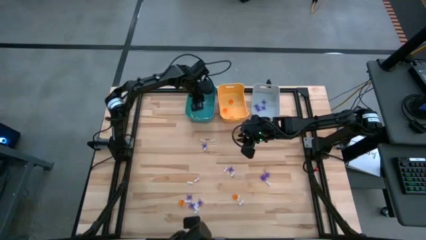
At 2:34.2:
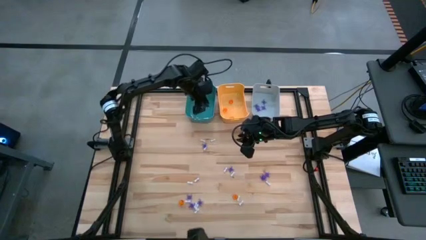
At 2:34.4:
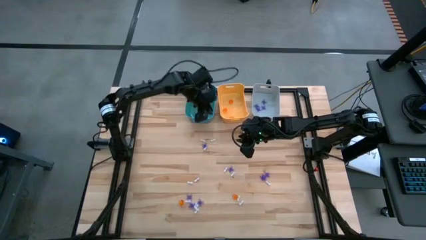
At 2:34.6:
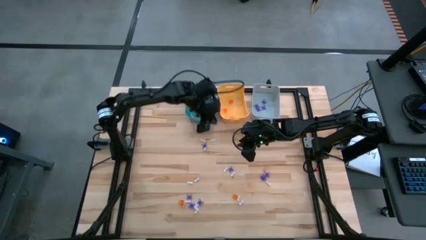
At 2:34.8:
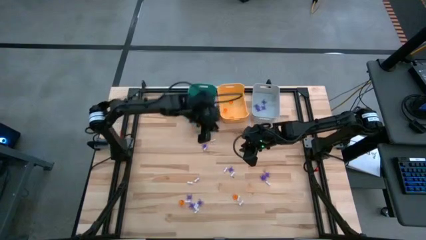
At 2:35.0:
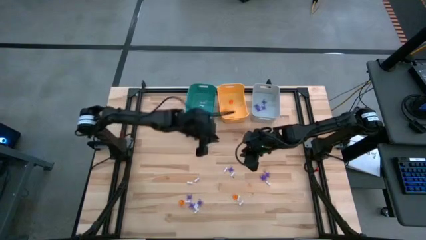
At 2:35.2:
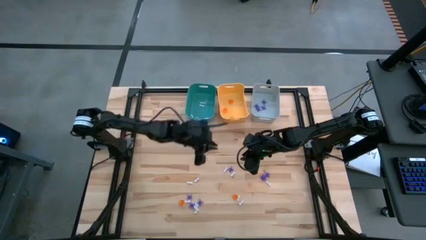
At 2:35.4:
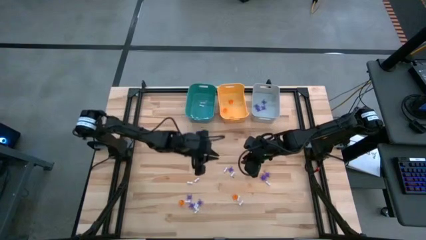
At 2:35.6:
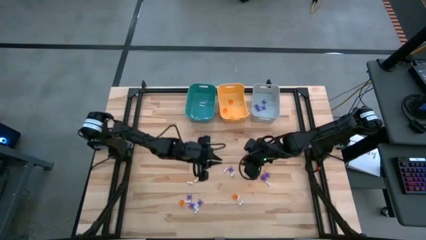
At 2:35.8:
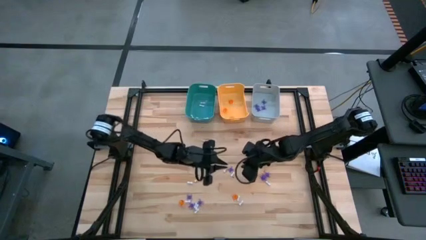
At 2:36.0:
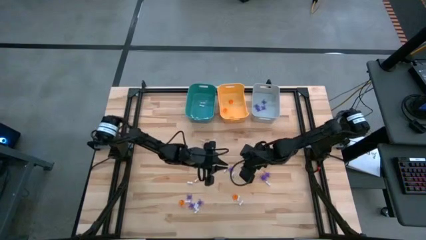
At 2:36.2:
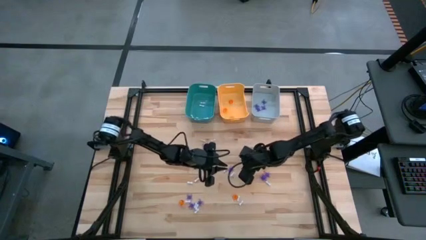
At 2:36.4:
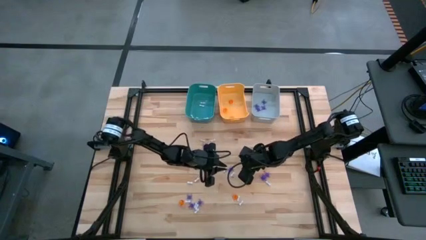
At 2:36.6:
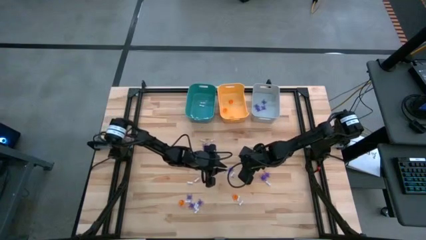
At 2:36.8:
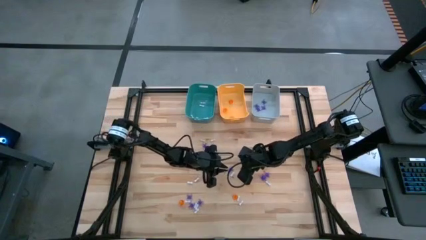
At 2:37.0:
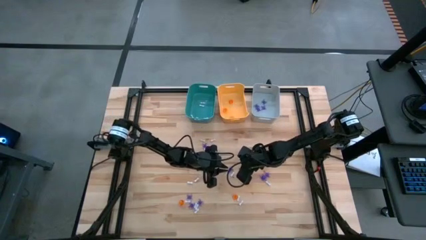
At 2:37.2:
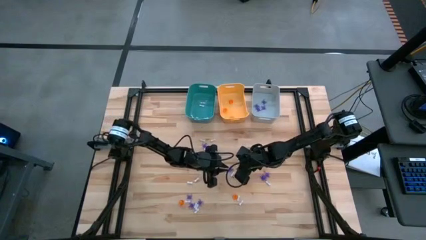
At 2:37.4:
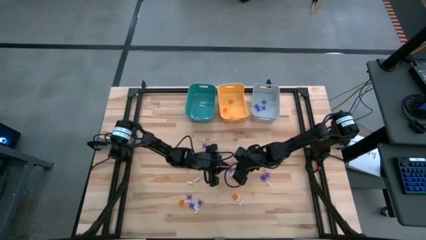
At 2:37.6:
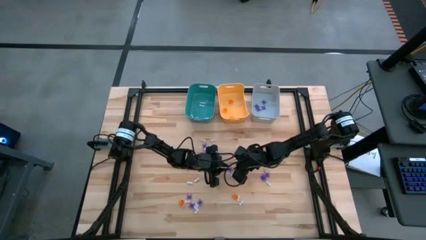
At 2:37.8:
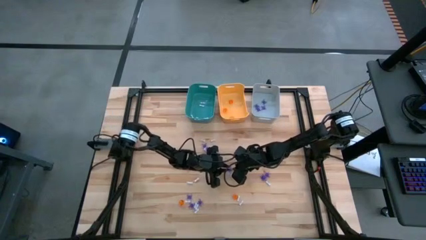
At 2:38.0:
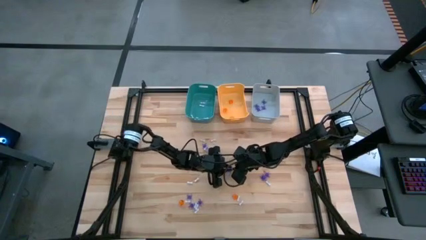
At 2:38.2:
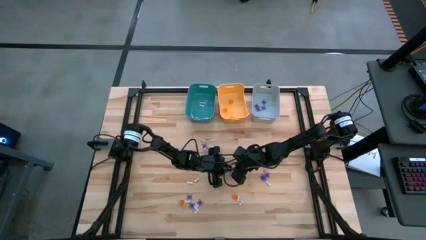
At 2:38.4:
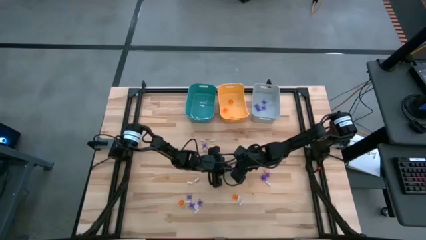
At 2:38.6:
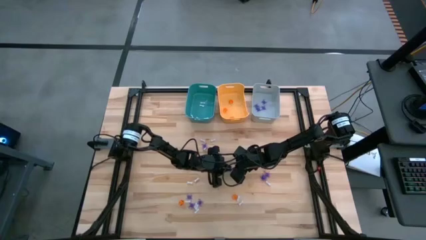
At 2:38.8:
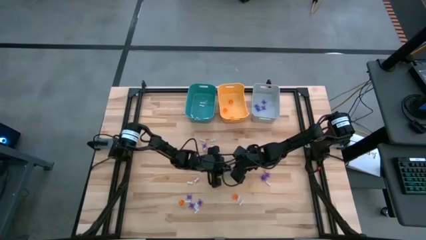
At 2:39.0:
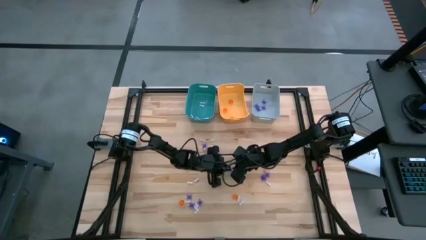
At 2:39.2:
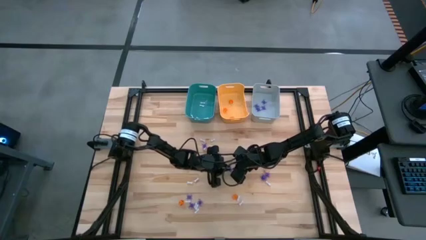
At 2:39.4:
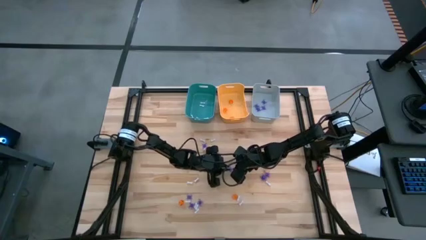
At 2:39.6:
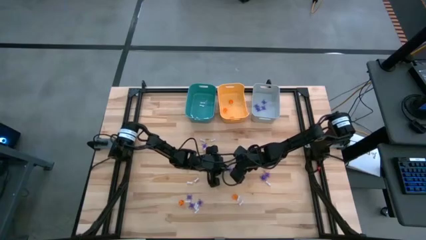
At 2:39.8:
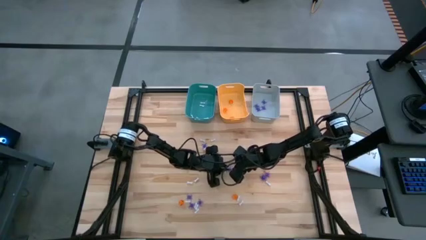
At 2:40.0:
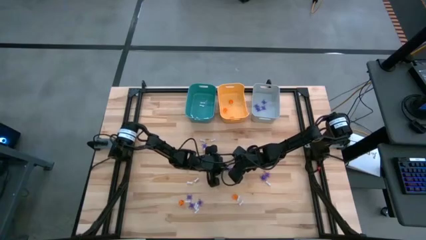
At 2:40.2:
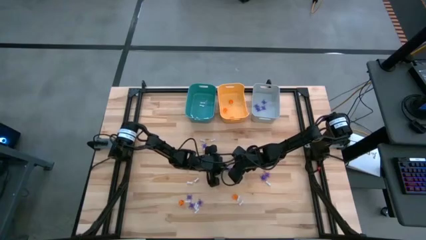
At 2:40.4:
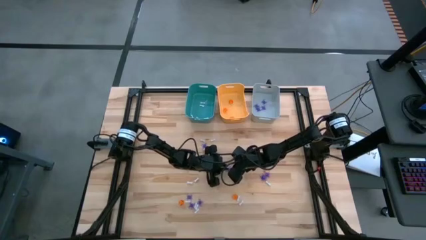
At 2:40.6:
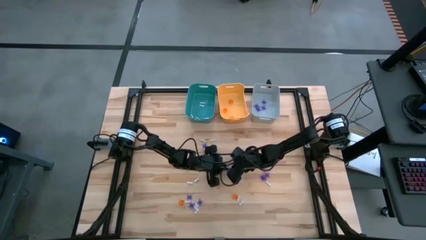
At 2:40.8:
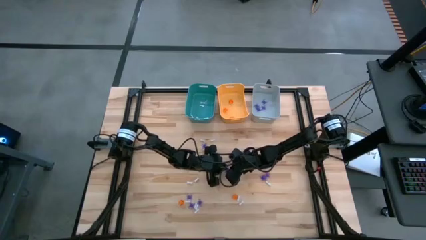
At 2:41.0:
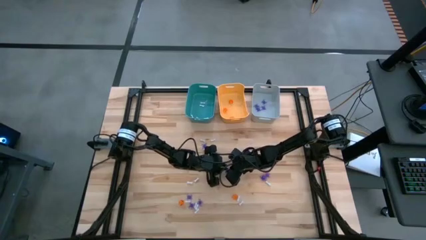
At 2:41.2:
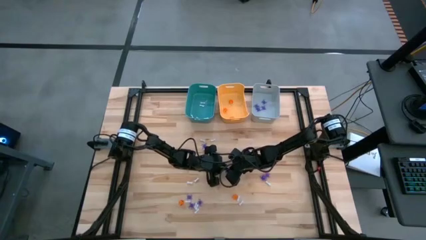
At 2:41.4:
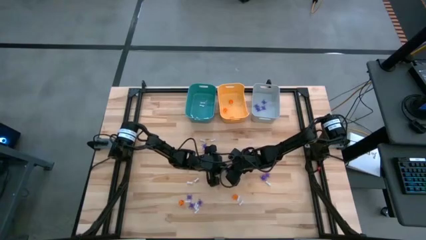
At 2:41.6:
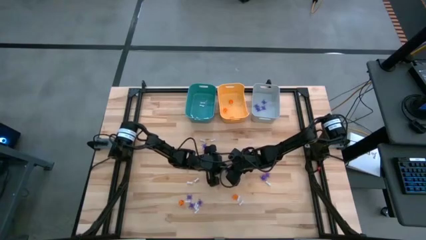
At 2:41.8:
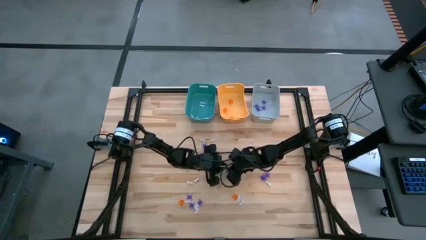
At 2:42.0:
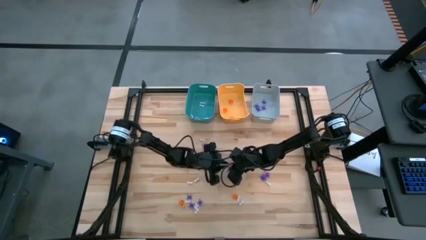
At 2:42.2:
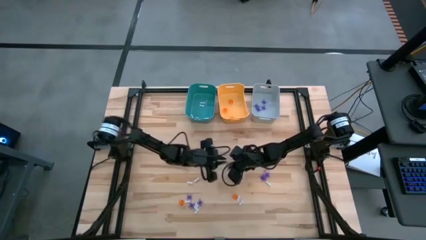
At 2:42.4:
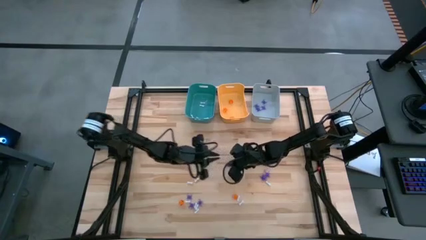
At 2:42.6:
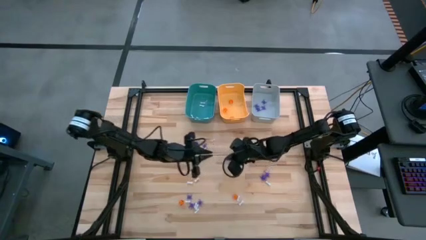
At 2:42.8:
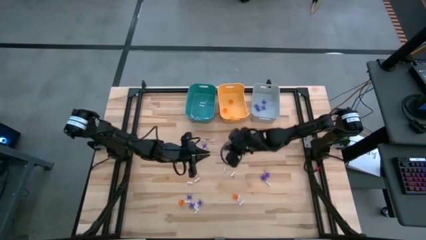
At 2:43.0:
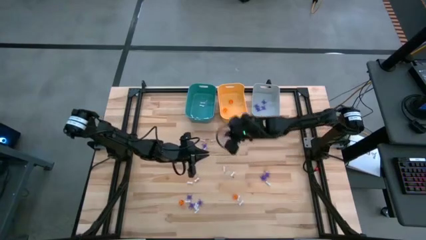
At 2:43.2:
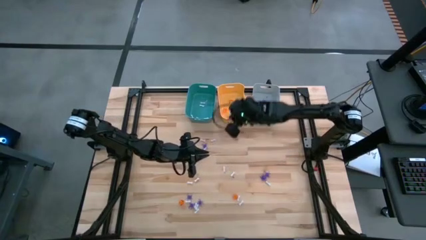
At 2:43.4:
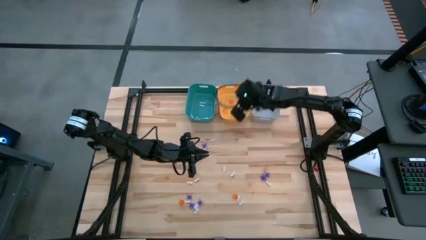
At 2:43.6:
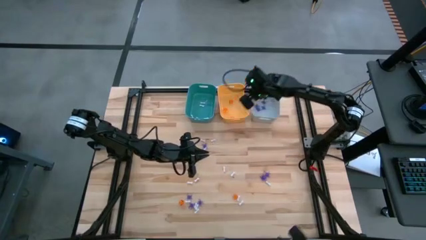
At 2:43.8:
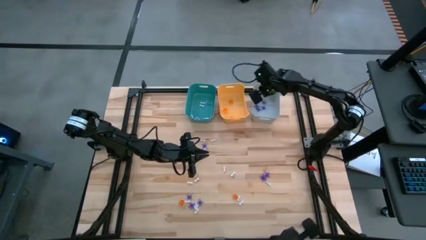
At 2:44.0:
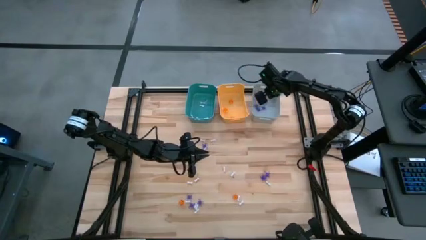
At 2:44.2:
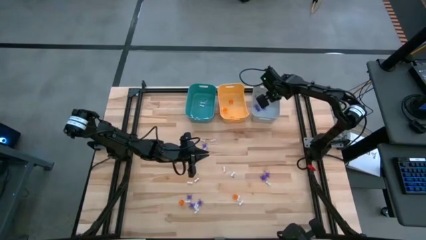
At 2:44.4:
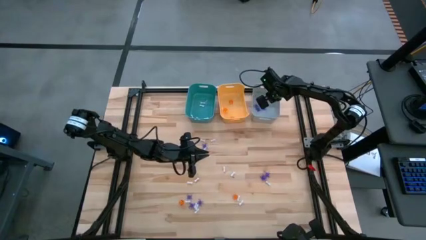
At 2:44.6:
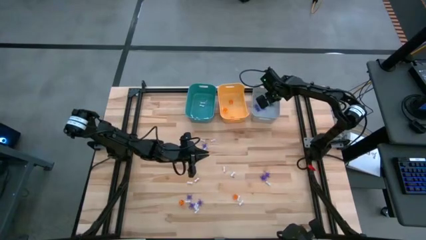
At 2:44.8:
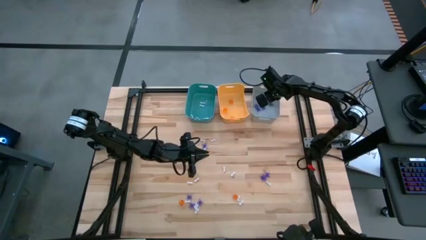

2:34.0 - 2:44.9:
Task: Sort Halloween decoration
Put the purple spider toy into the gray bin
